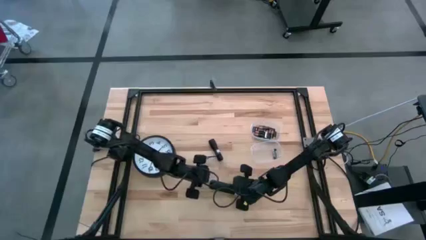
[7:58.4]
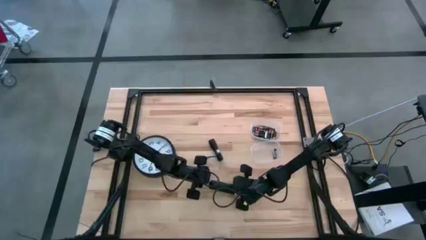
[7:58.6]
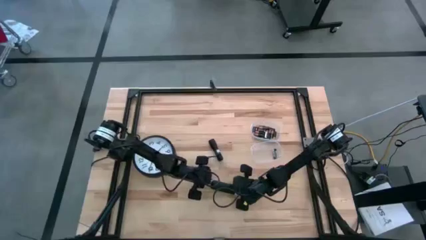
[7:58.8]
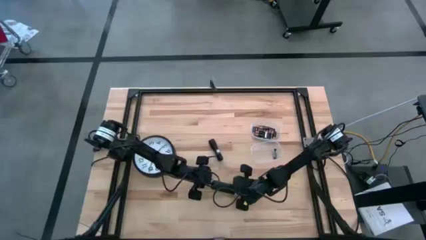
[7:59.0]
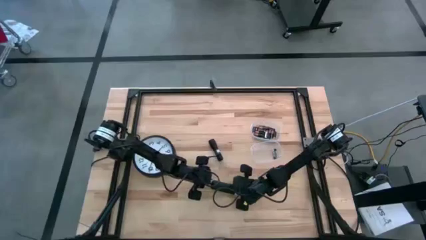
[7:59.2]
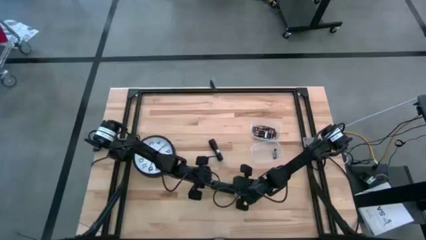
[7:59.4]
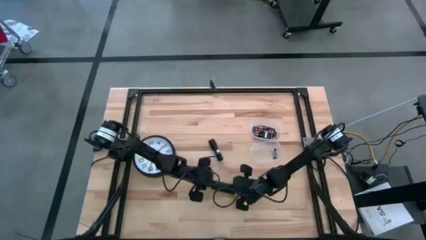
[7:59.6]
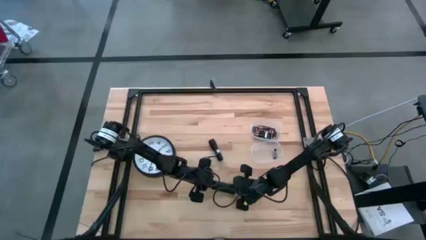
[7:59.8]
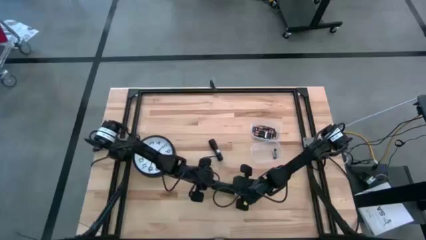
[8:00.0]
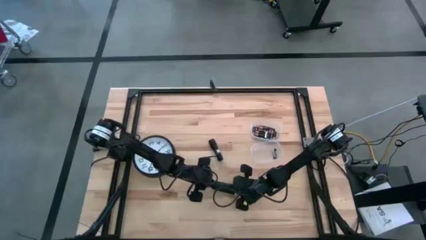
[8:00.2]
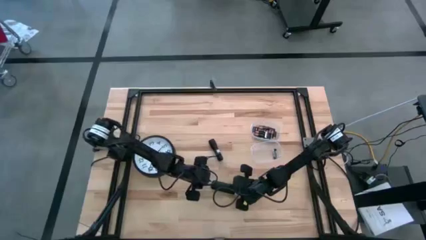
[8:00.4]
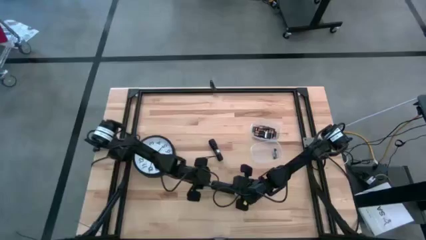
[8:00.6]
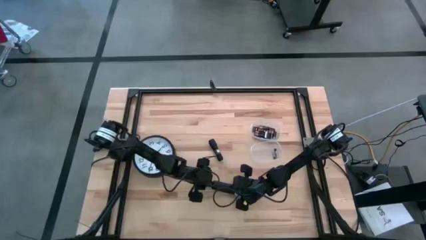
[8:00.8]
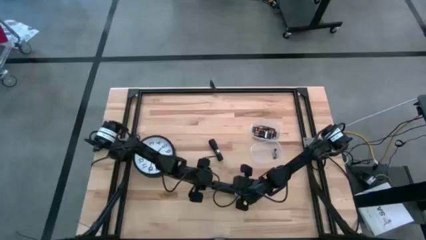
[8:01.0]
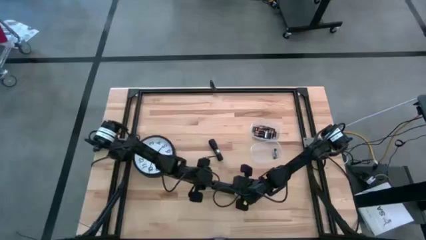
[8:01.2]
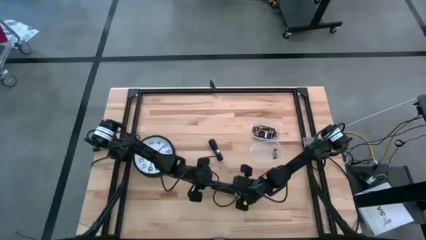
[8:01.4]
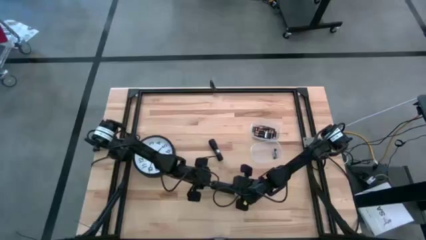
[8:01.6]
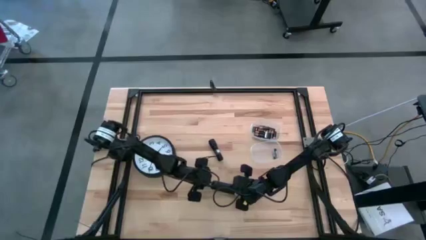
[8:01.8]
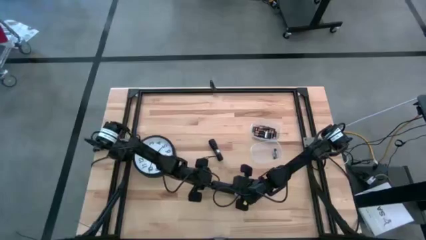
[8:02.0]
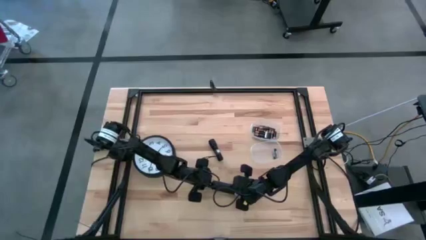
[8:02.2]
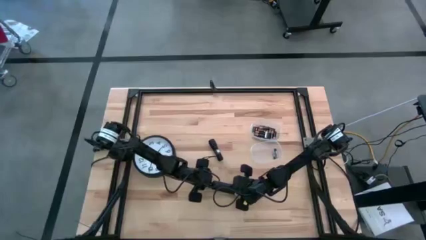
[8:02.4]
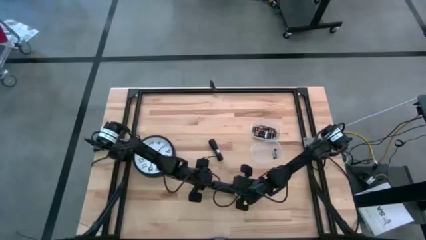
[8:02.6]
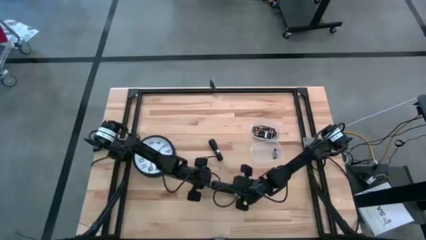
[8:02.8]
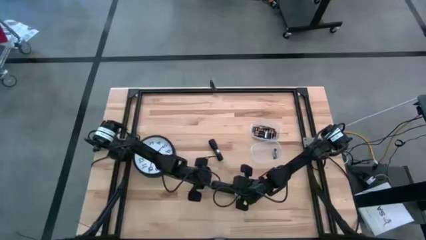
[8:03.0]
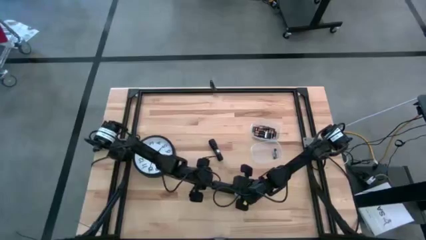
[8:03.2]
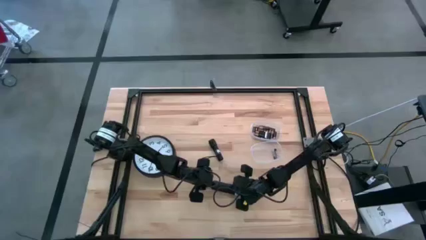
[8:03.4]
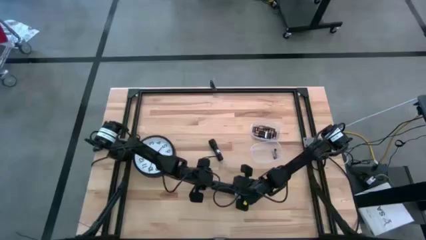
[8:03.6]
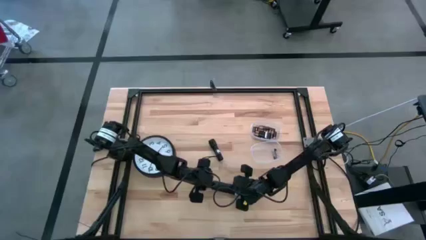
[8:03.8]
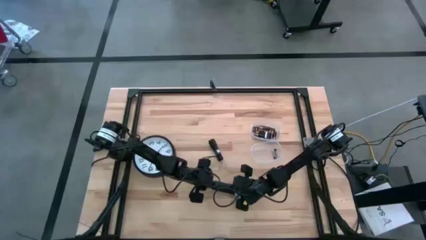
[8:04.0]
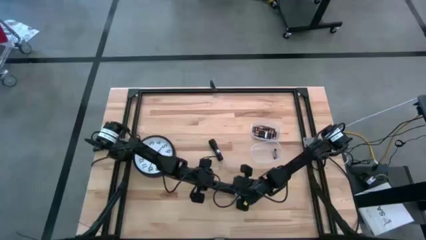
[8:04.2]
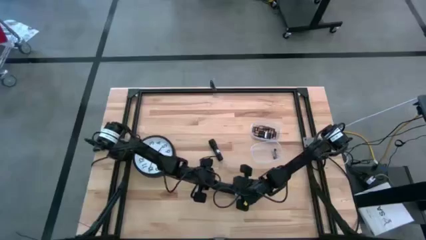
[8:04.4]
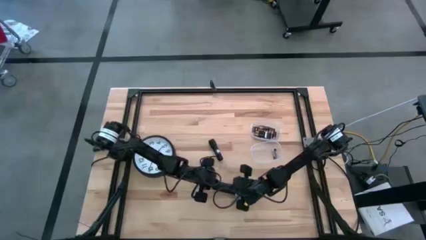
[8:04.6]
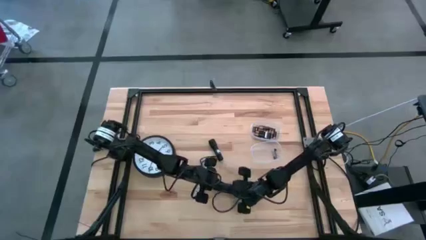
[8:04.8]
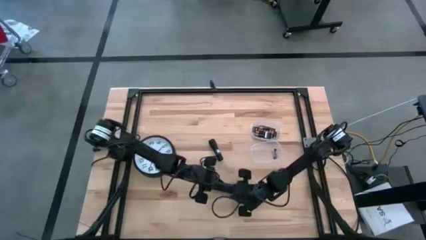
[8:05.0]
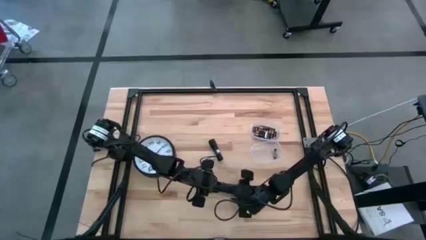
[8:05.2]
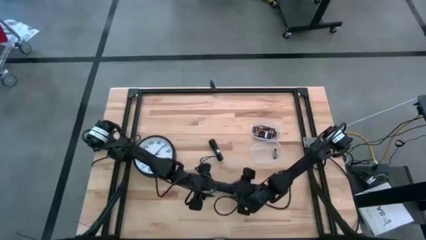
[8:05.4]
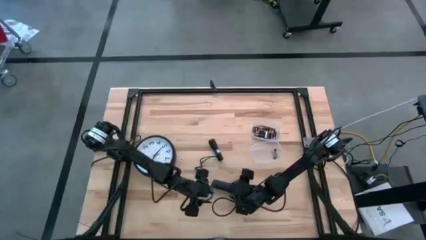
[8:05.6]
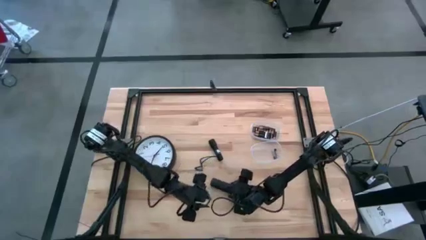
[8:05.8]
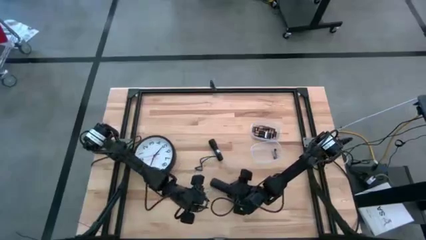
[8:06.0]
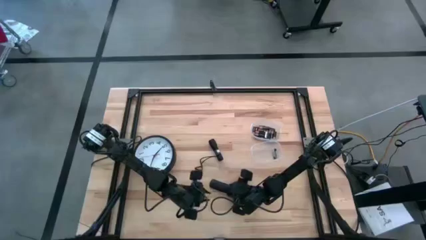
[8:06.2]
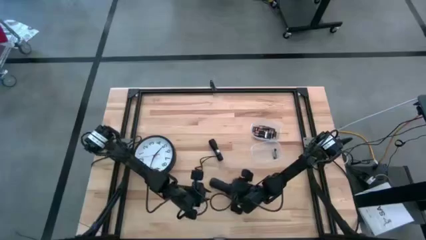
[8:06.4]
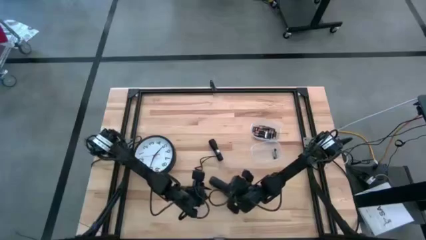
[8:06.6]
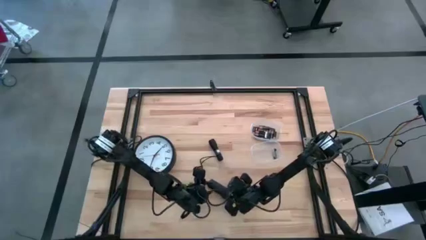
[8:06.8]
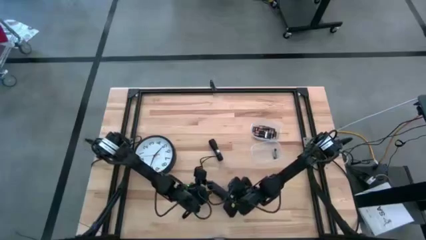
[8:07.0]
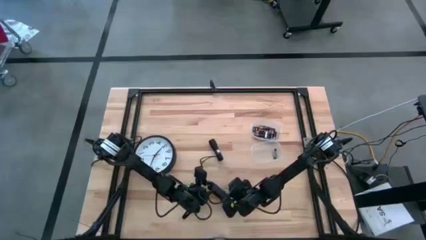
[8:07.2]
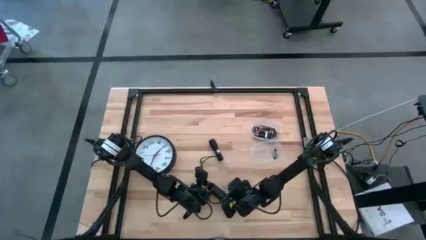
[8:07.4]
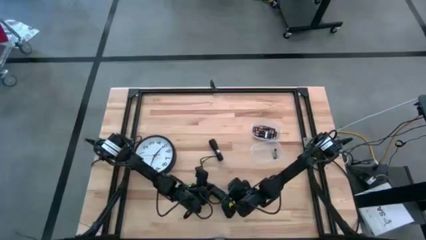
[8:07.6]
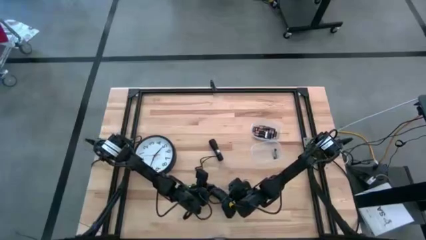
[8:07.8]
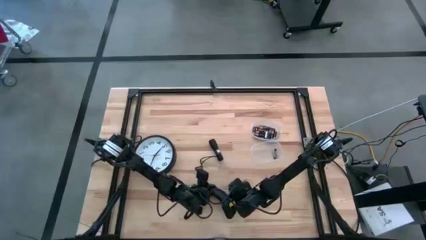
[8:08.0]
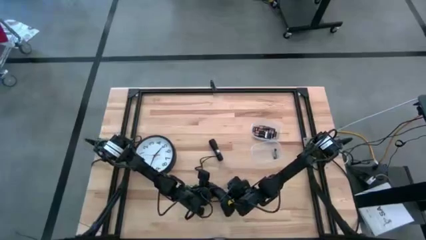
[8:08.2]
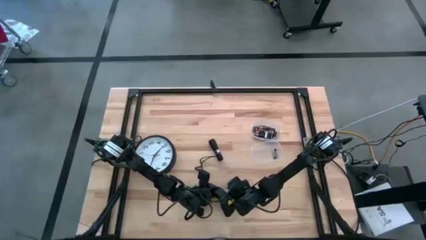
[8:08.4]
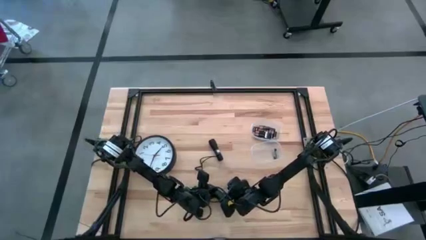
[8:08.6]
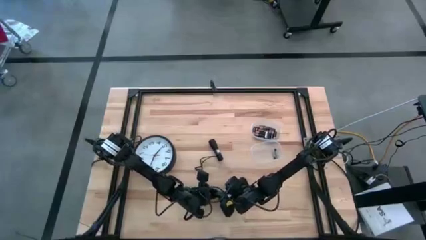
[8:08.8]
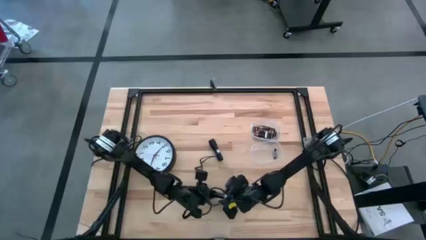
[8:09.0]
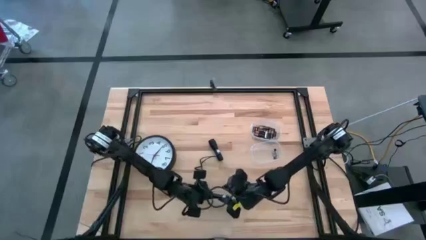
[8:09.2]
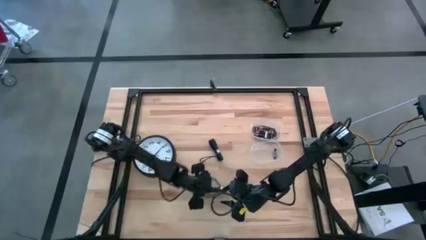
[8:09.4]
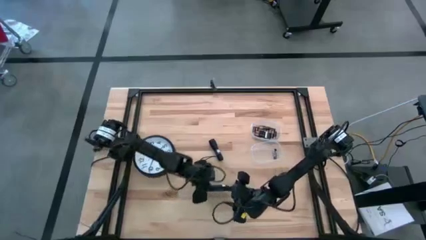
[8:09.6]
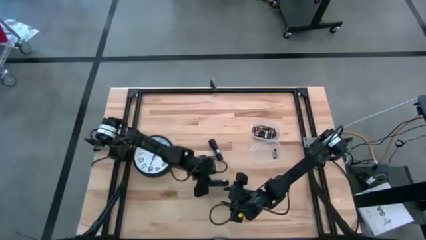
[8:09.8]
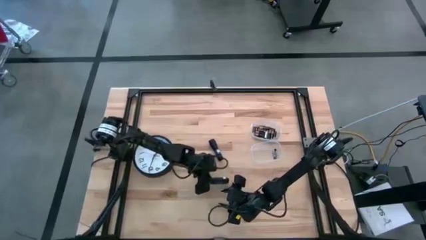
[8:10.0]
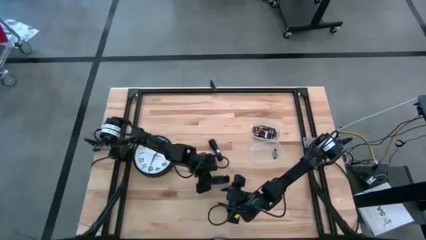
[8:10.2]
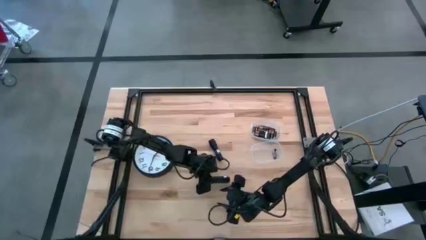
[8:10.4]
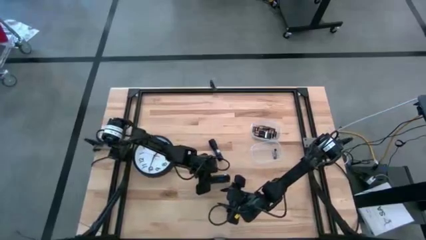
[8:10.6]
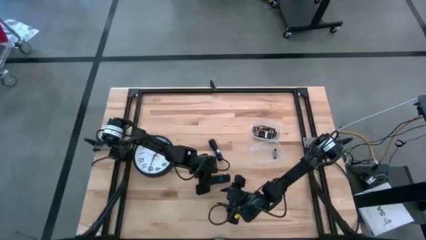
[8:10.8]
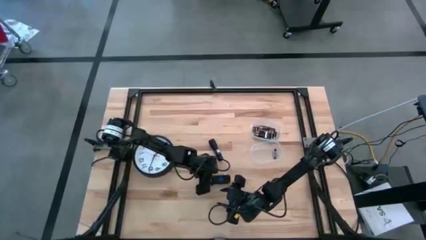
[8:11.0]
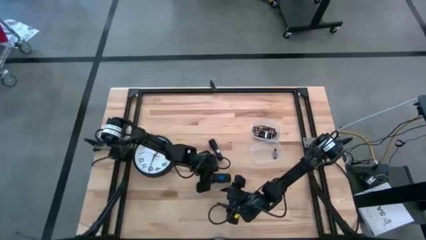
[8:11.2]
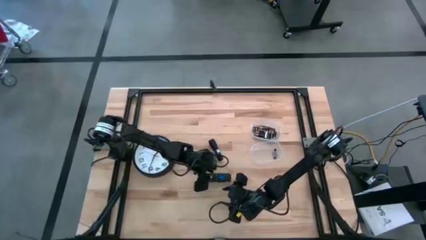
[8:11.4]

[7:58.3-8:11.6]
Task: Insert battery
Close the remote’s battery compartment cover

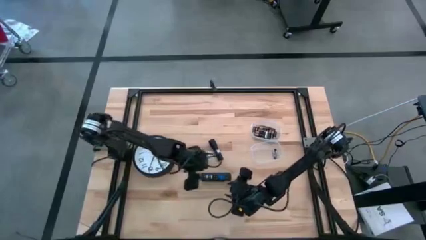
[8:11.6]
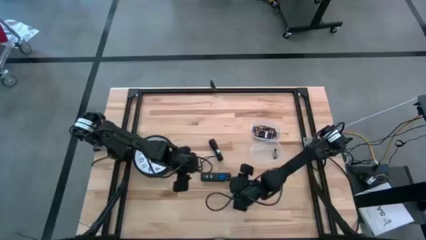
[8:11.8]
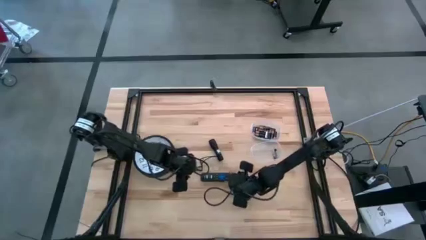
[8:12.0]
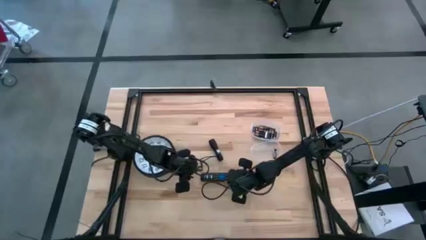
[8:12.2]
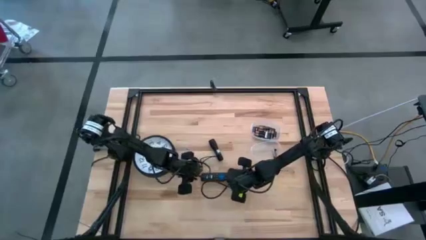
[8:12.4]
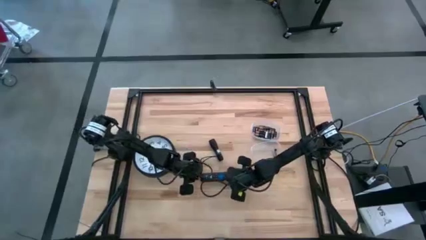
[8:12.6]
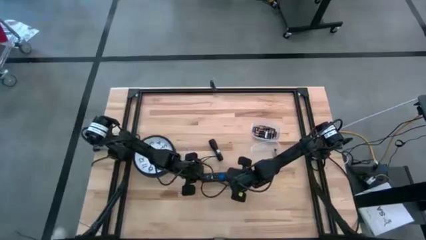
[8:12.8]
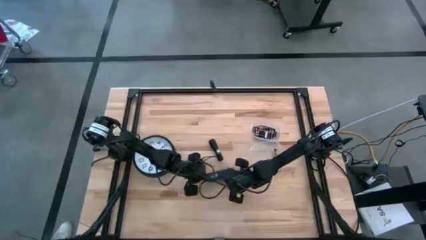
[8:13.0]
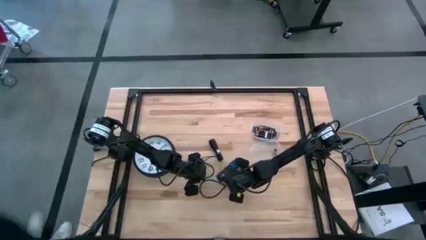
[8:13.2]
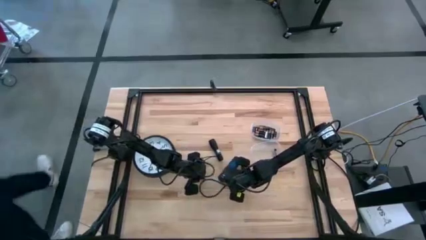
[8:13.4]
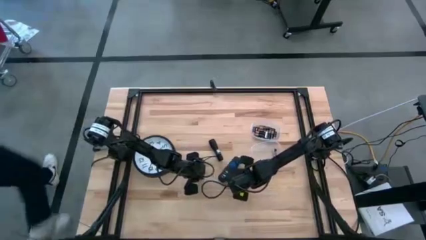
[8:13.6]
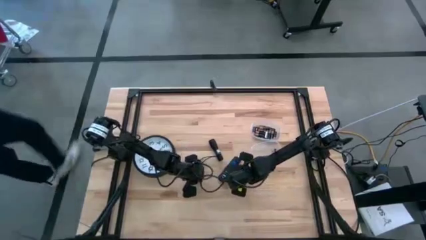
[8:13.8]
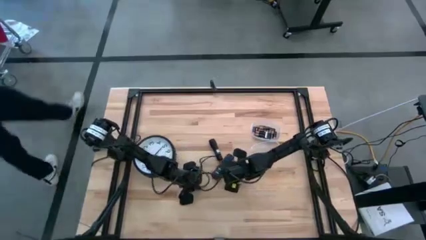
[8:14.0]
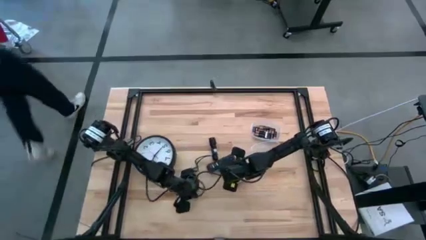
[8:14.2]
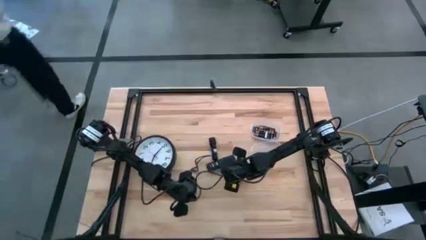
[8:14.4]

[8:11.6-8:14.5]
Adjust the black remote's

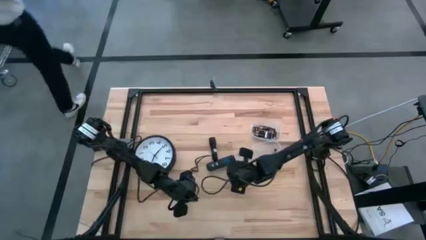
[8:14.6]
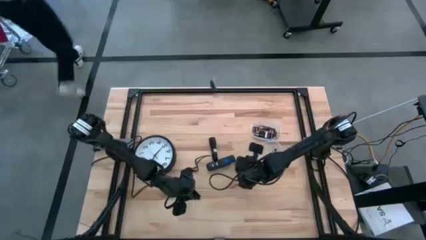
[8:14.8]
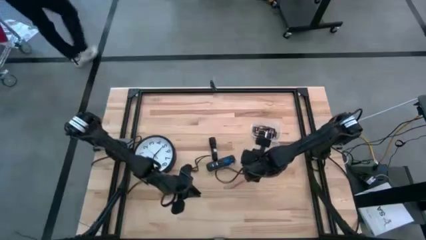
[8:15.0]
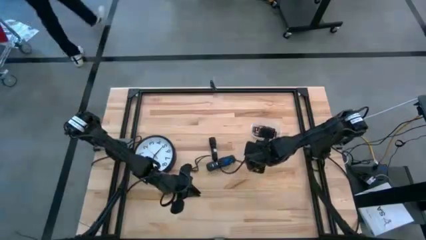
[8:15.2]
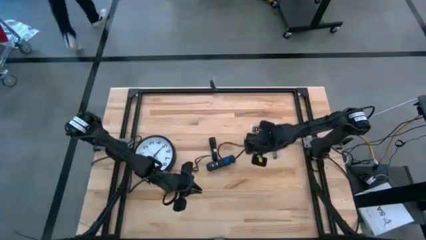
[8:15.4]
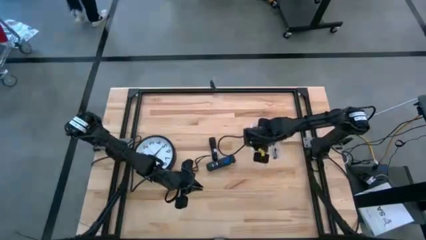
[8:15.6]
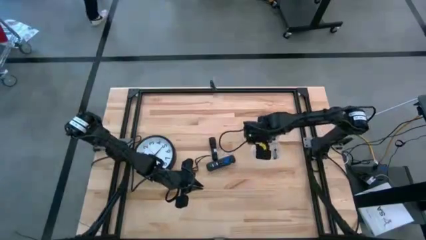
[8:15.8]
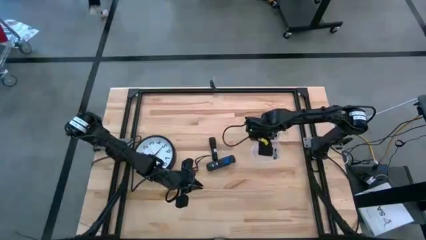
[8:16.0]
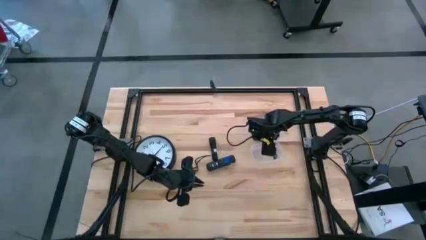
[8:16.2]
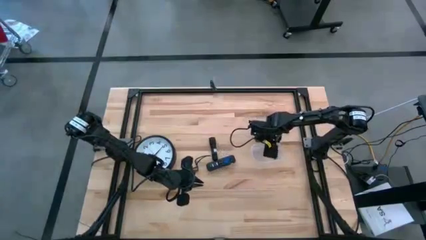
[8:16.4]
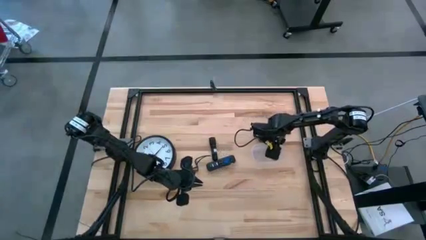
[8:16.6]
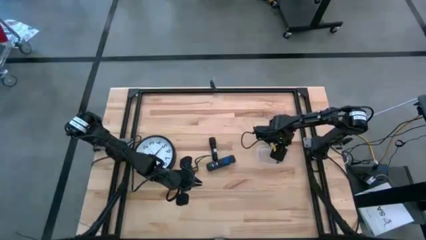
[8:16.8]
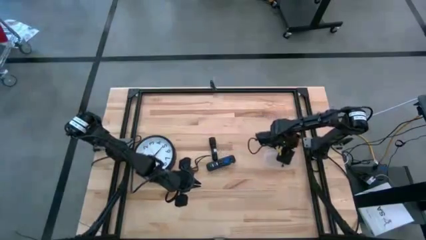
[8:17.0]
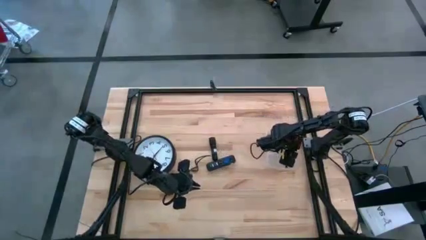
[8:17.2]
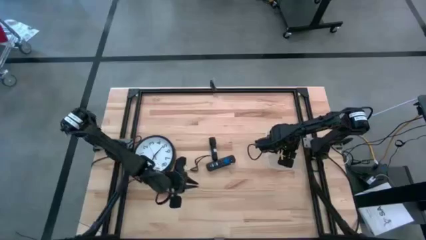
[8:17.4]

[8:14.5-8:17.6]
Adjust the transparent bin
